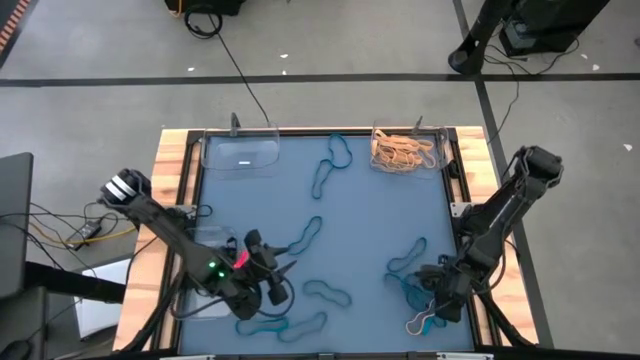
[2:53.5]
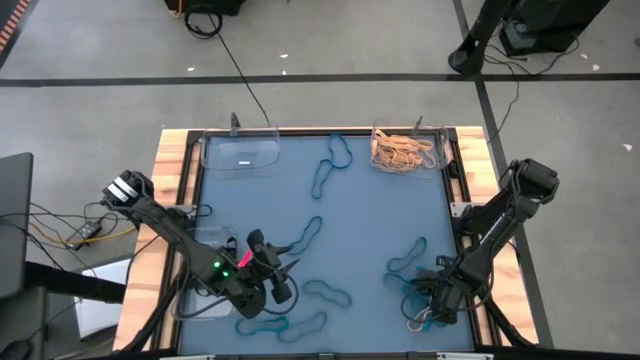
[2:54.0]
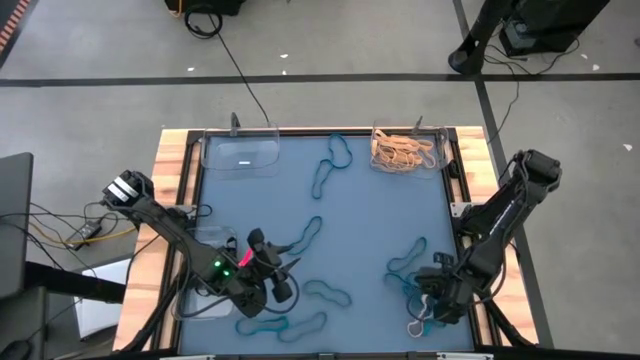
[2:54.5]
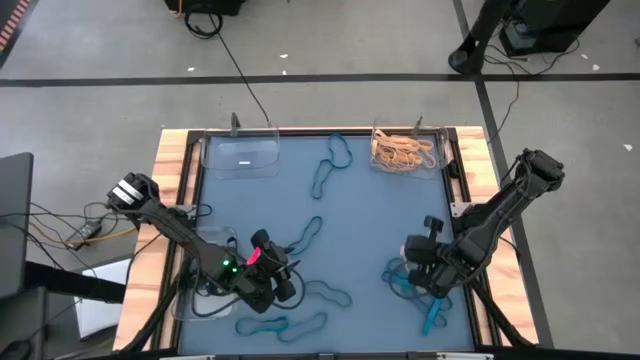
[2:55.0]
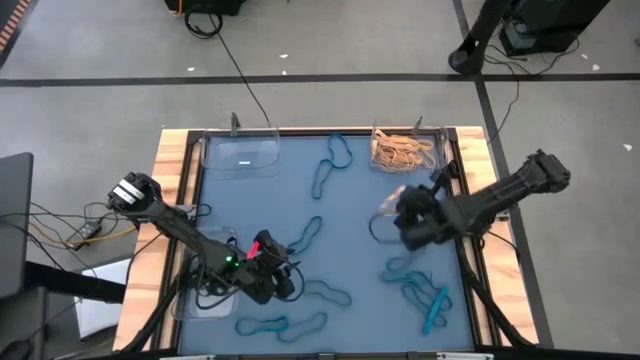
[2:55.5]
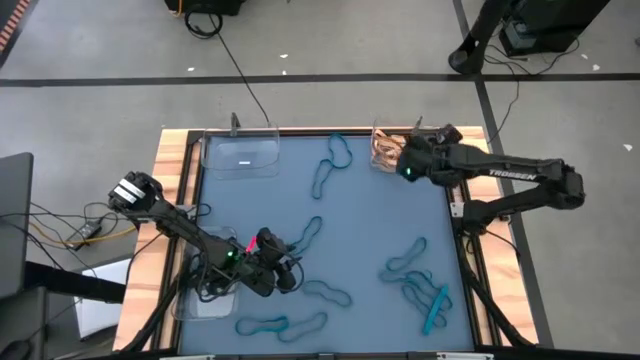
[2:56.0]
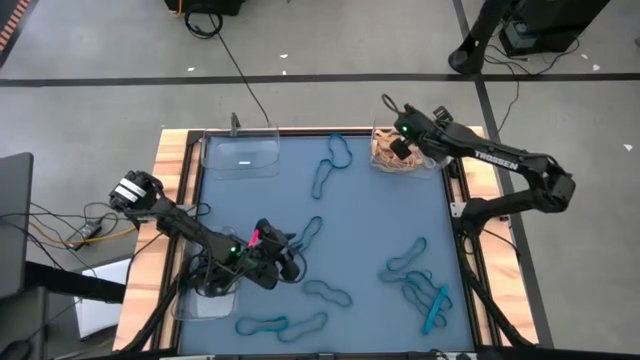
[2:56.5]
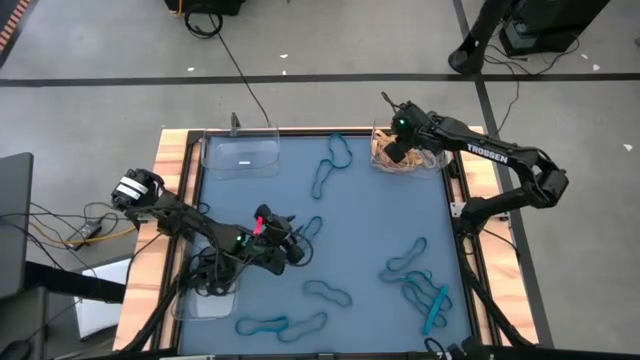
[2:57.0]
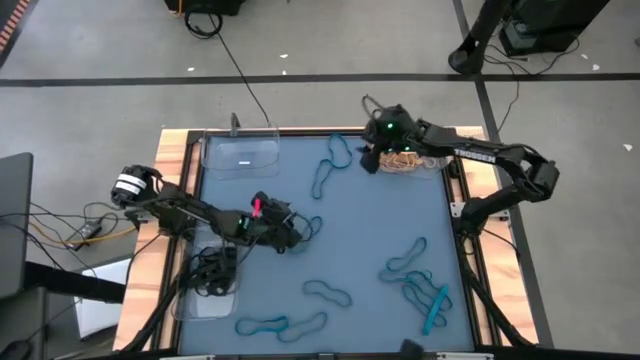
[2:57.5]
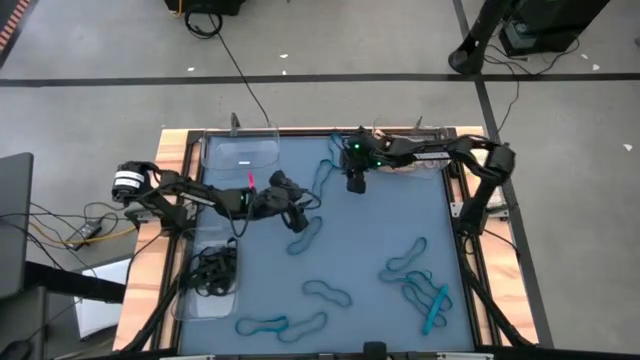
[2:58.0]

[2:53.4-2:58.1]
Task: Sort rubber bands into baskets
Put the yellow rubber band into the top right transparent bin

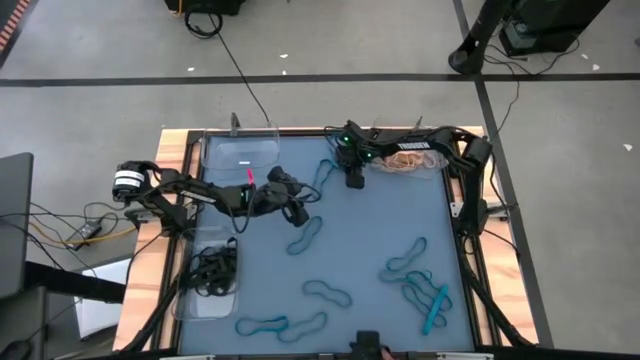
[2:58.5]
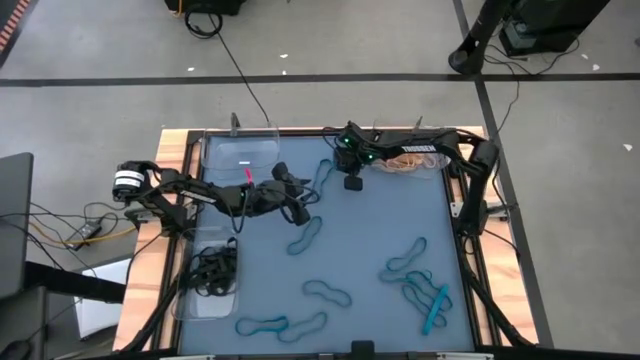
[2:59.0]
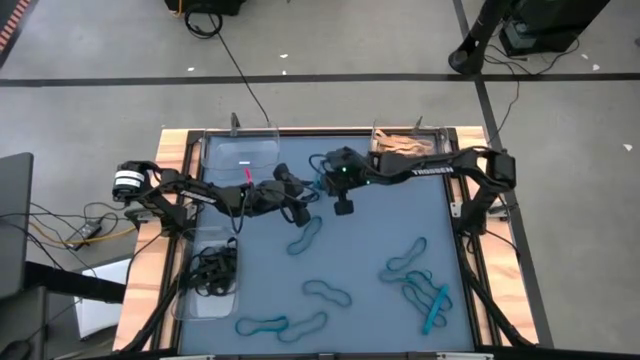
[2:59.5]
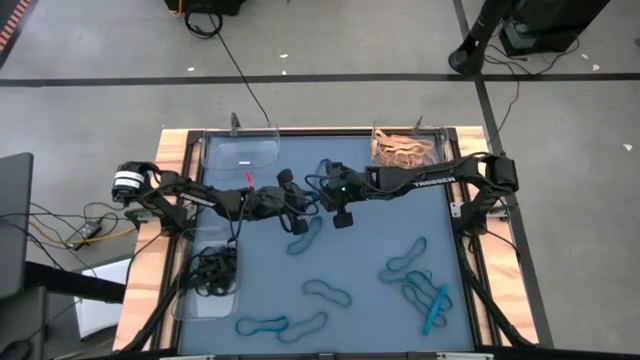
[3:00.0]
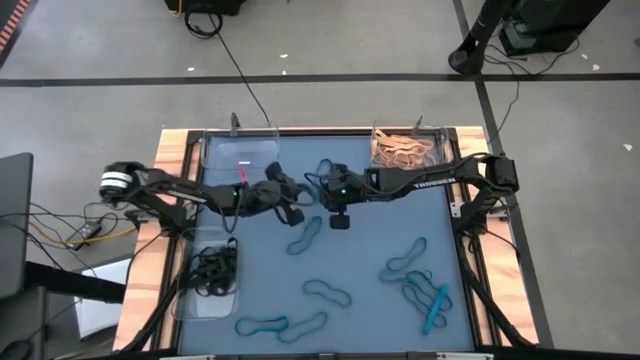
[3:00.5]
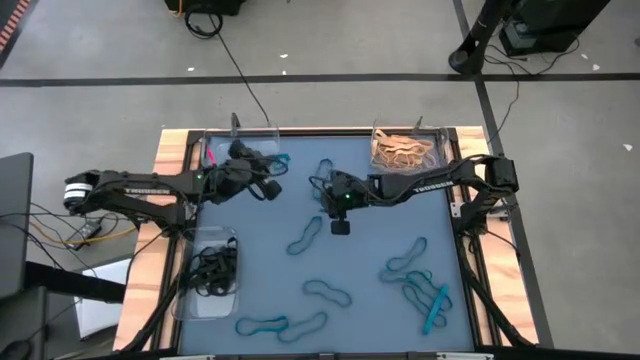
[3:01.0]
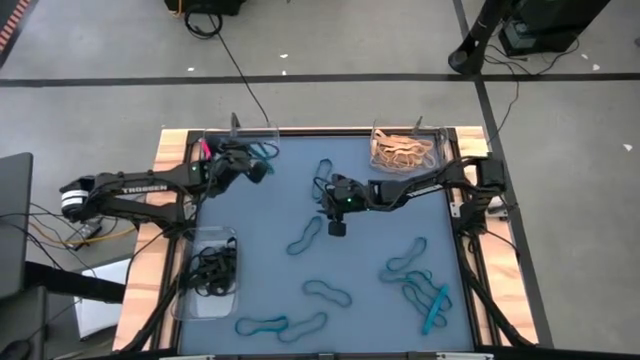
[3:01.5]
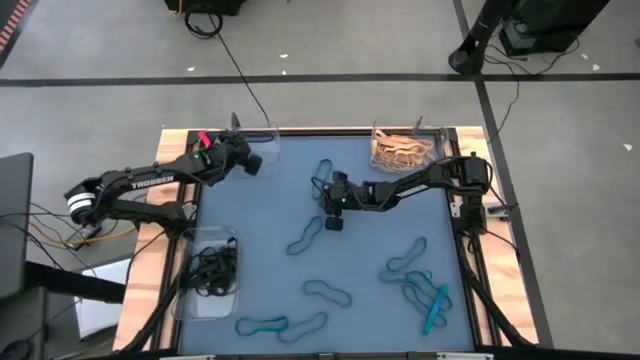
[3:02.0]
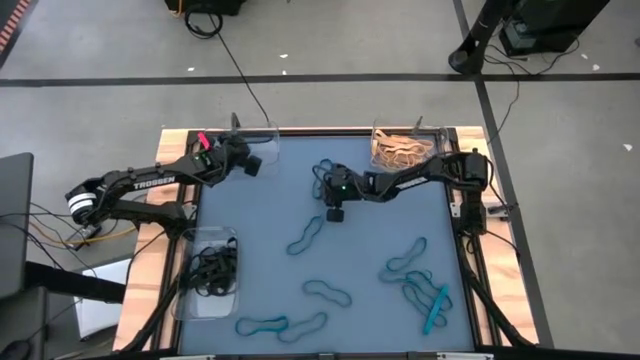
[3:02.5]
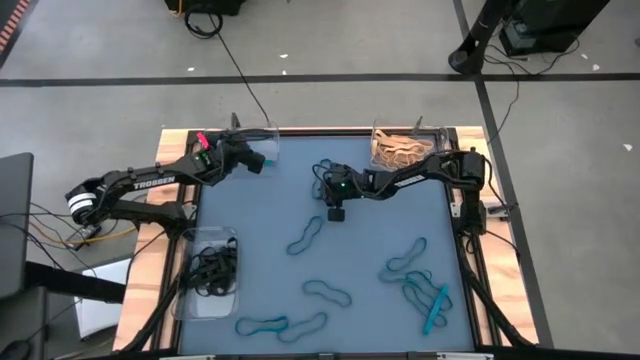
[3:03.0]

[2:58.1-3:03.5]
Put the blue rubber band into the top left transparent bin

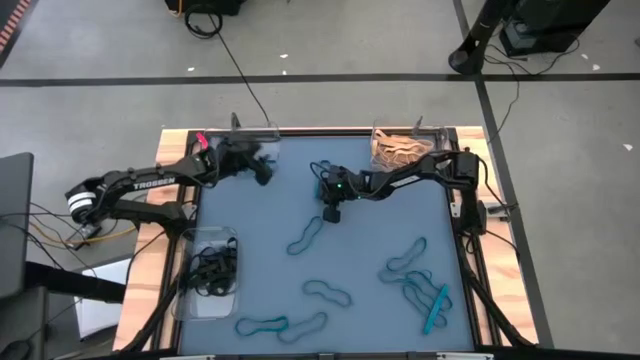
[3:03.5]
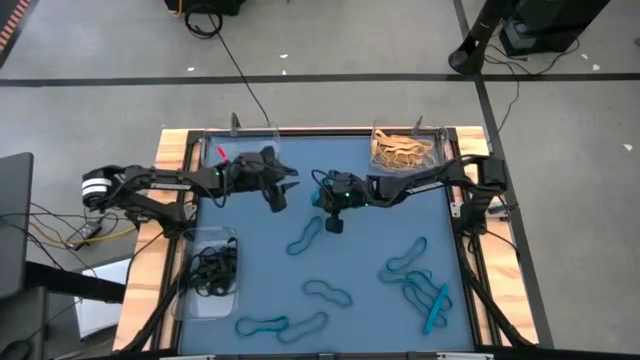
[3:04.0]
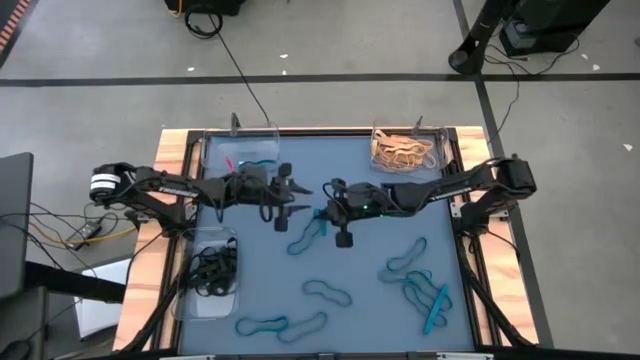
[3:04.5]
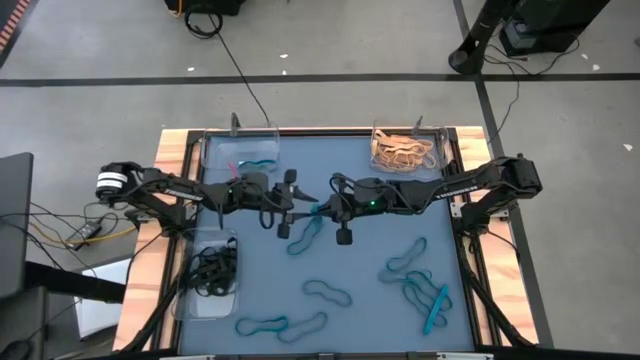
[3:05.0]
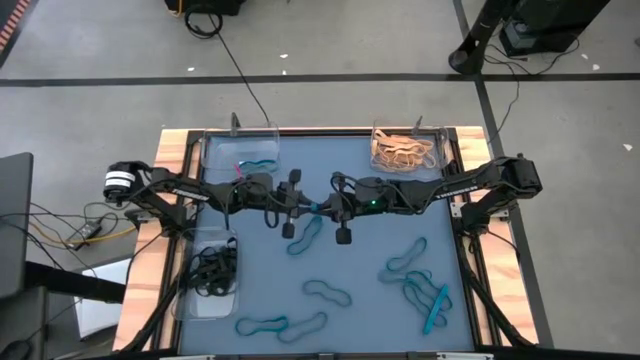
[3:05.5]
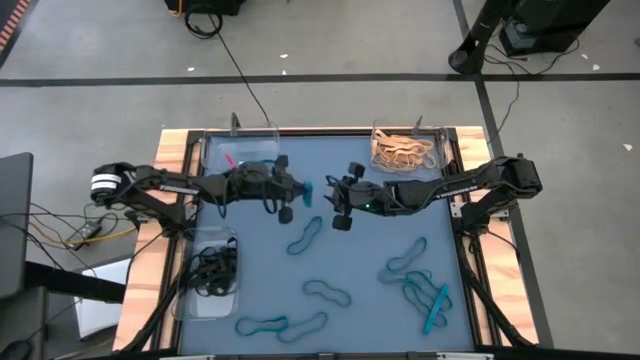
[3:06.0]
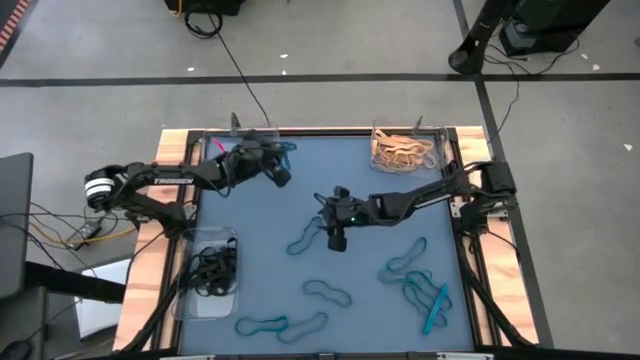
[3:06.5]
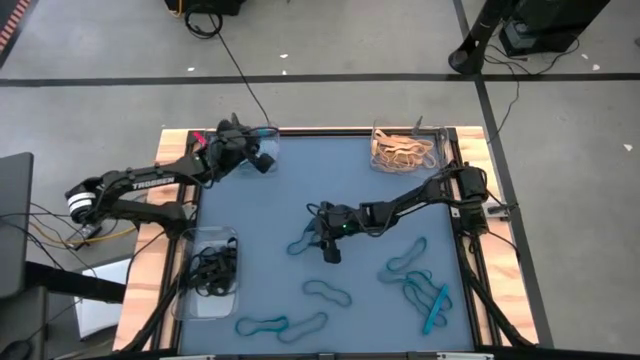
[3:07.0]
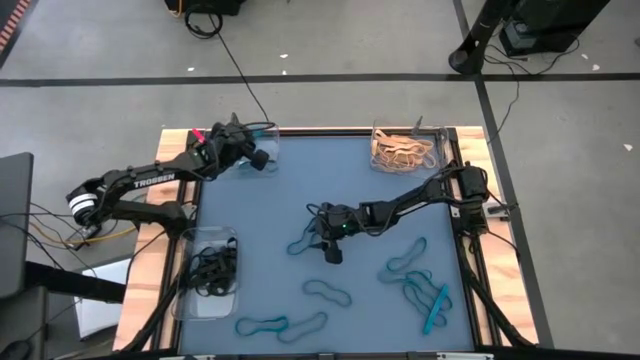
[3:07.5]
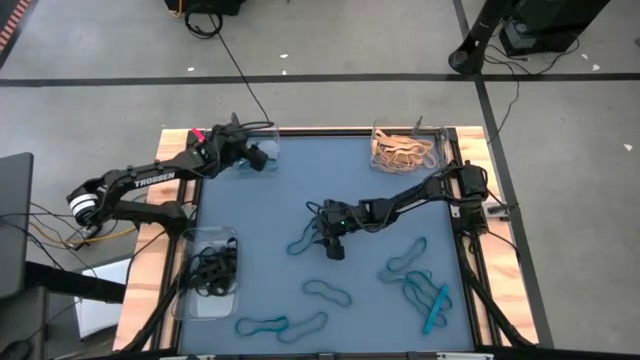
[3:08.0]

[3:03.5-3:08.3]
Put the blue rubber band into the top left transparent bin

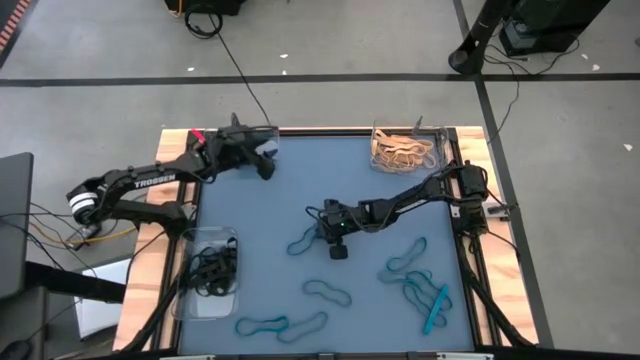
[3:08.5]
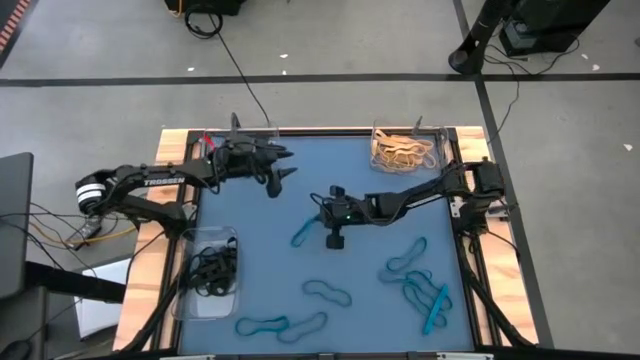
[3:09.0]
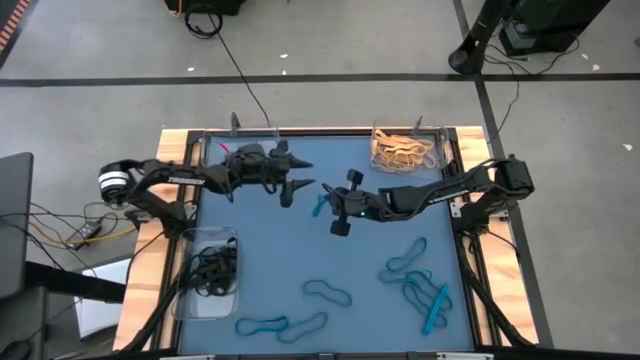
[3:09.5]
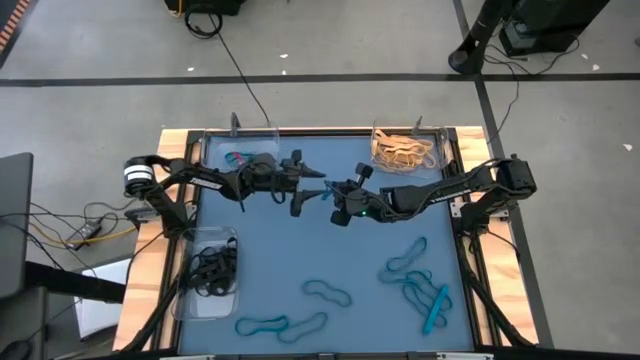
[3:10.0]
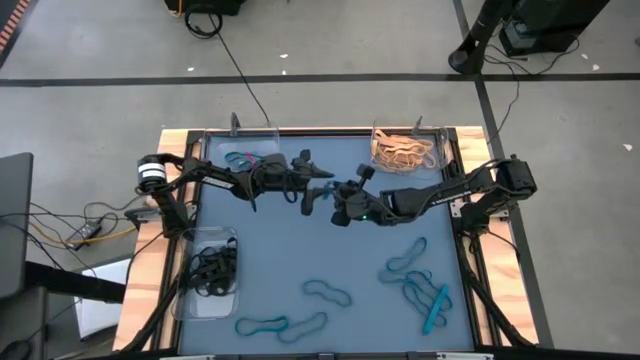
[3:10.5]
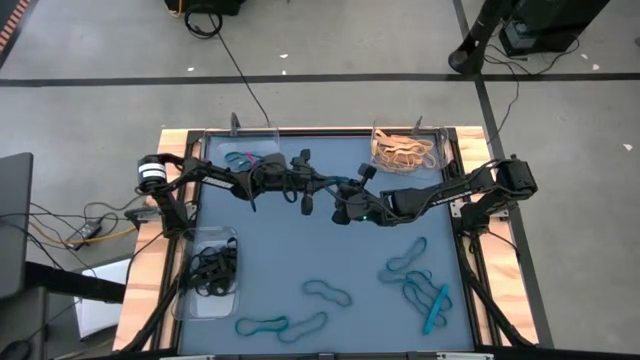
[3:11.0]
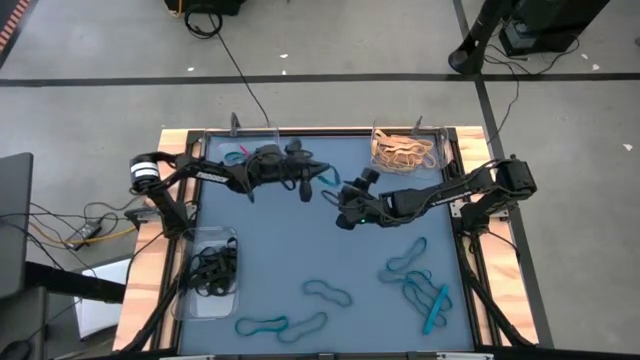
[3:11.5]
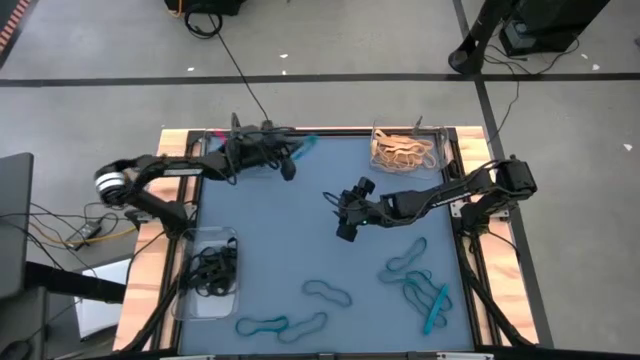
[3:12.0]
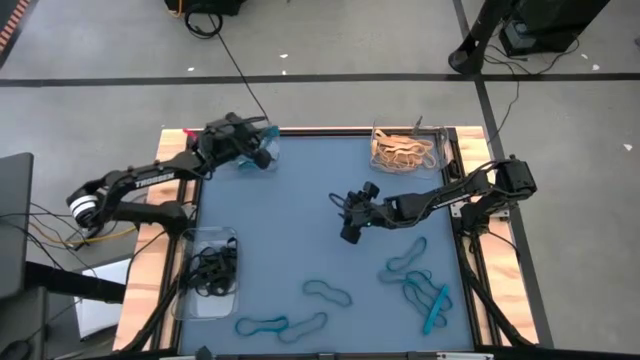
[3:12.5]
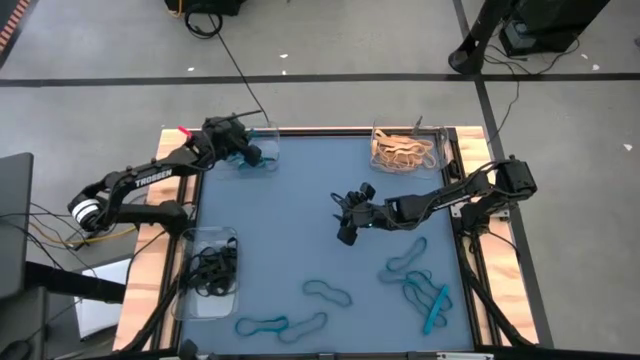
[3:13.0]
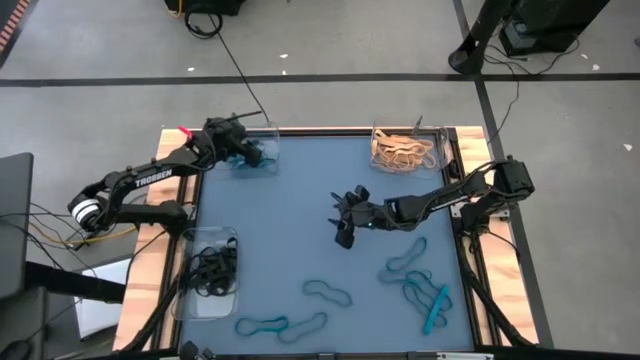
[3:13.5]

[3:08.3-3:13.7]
Put the blue rubber band into the top left transparent bin
